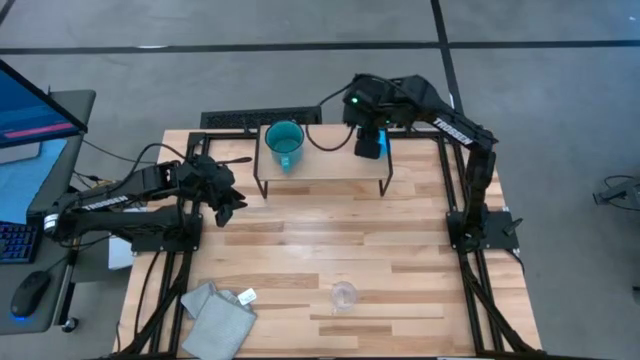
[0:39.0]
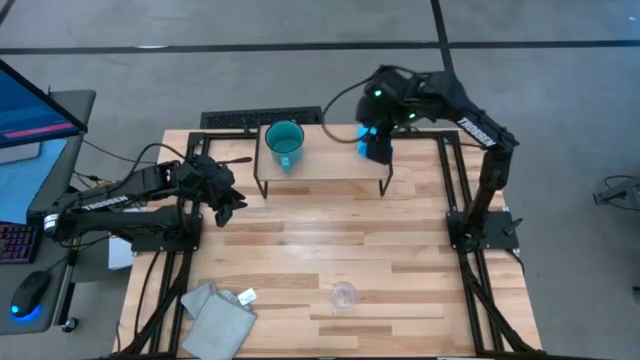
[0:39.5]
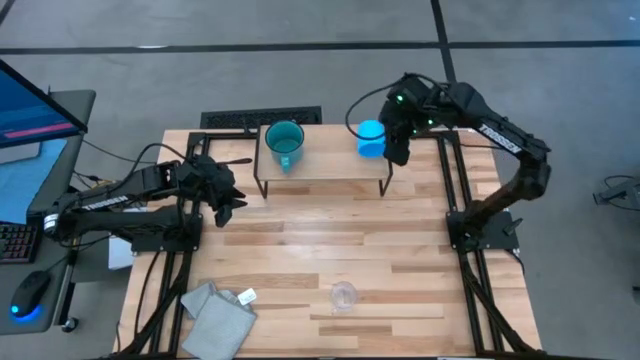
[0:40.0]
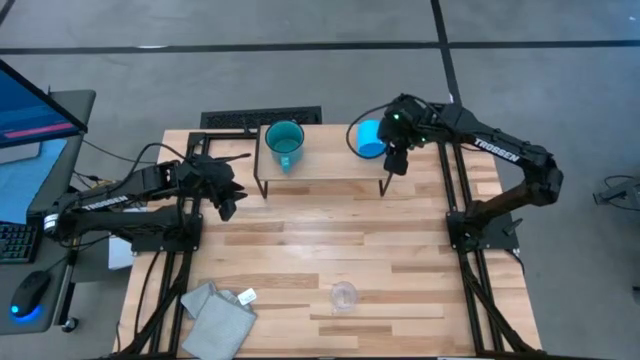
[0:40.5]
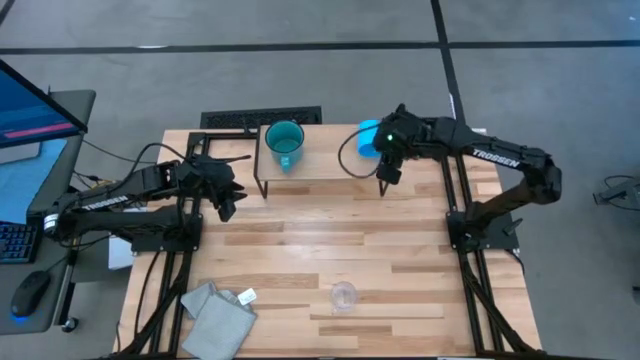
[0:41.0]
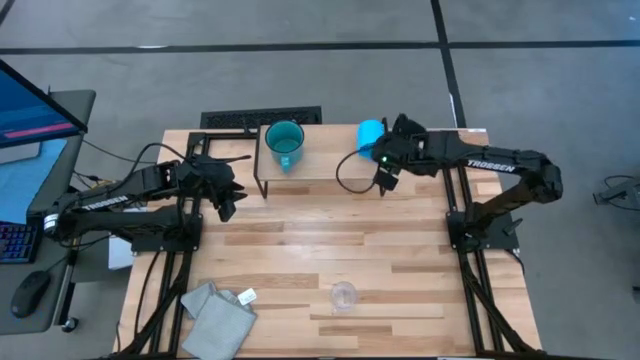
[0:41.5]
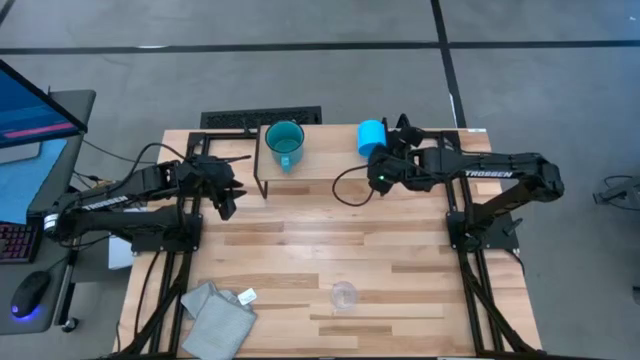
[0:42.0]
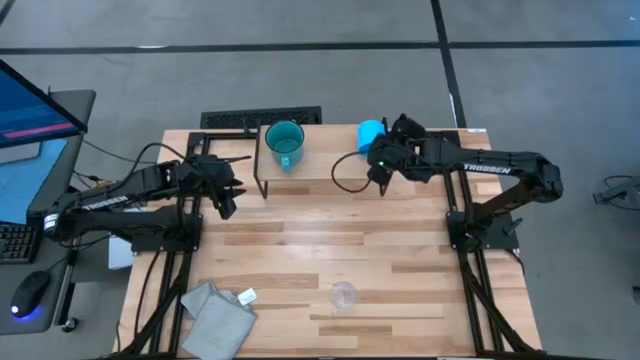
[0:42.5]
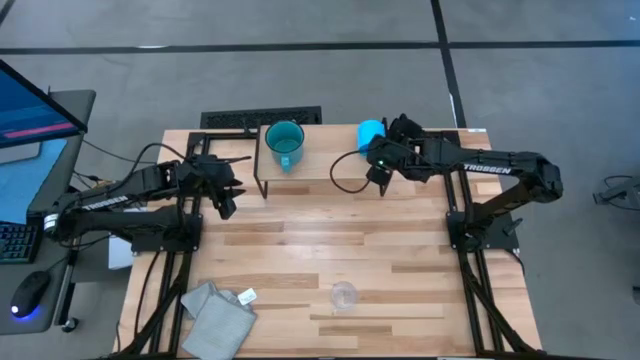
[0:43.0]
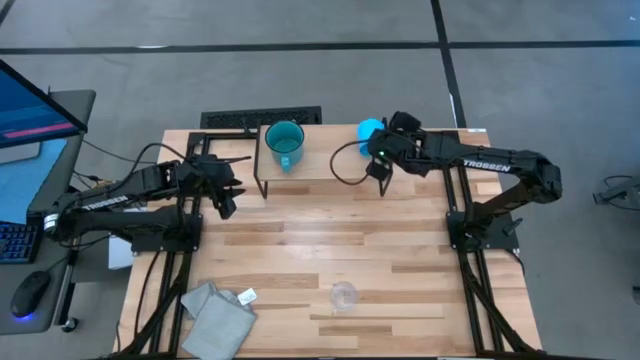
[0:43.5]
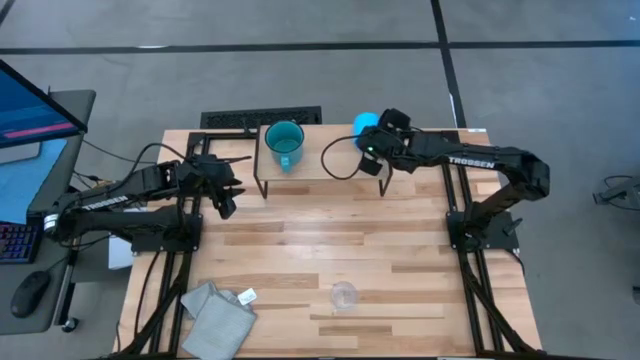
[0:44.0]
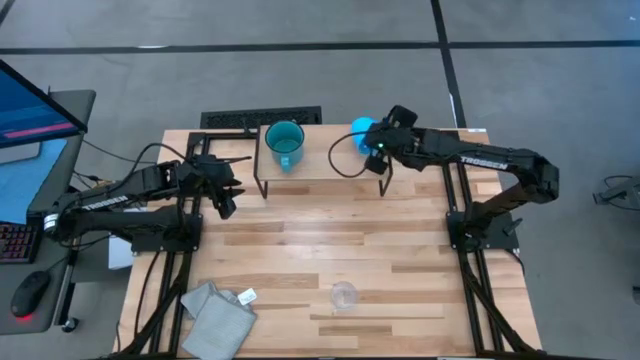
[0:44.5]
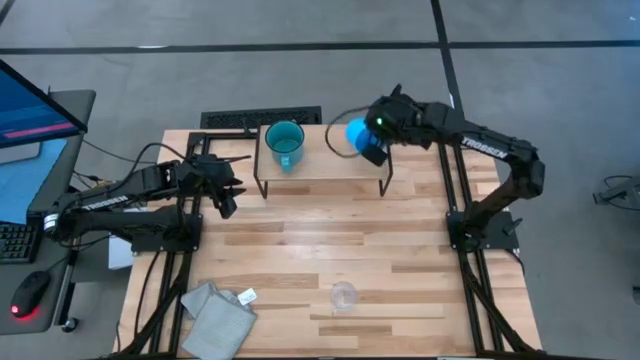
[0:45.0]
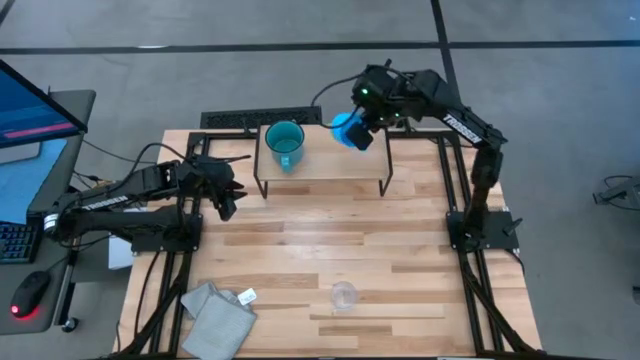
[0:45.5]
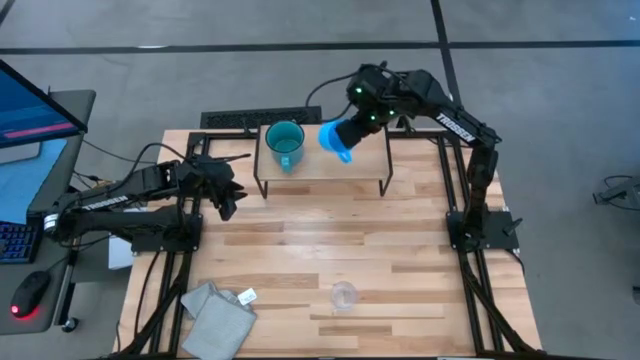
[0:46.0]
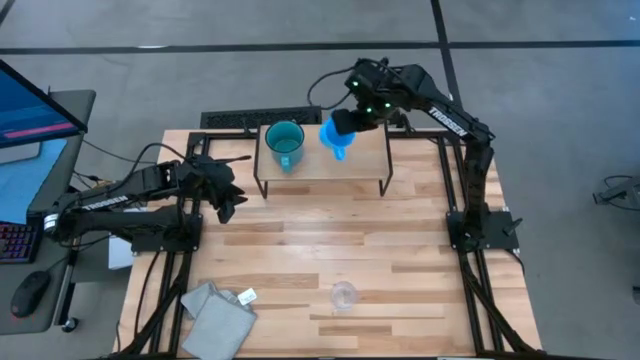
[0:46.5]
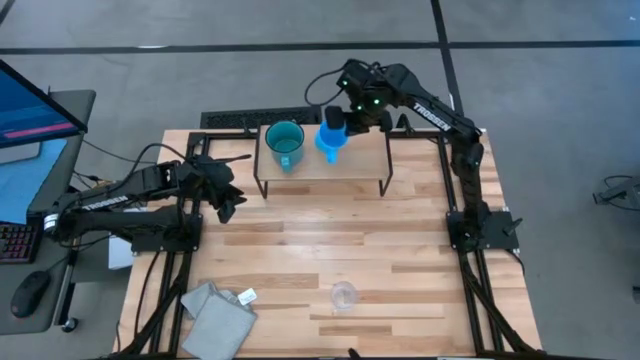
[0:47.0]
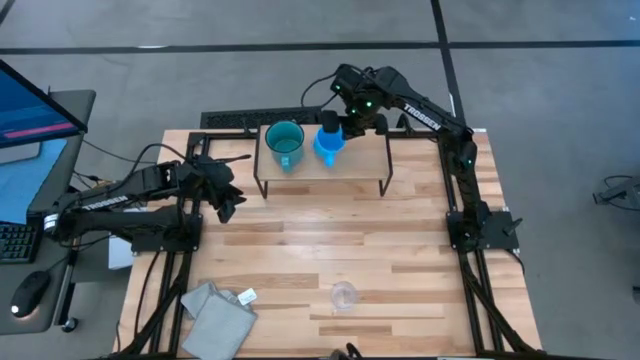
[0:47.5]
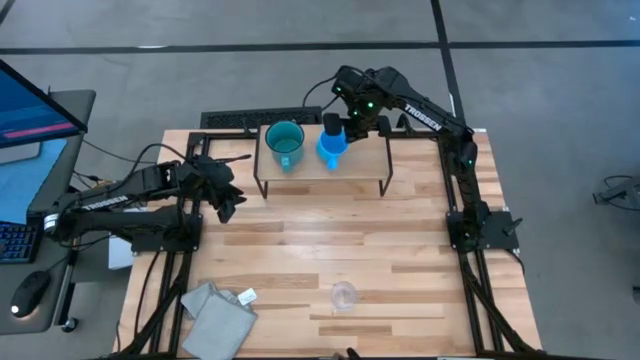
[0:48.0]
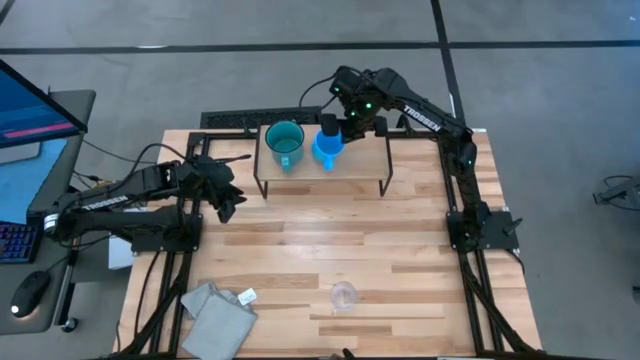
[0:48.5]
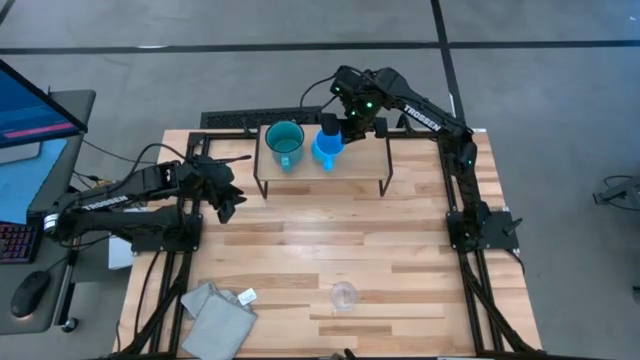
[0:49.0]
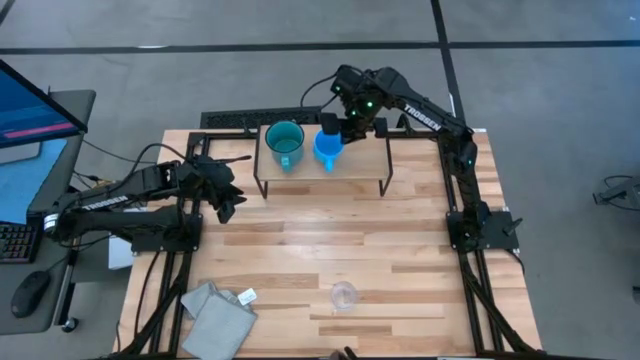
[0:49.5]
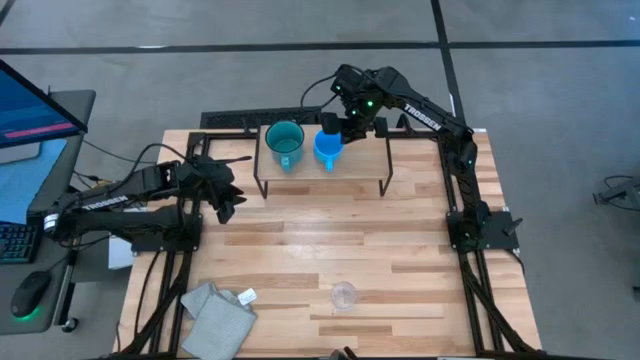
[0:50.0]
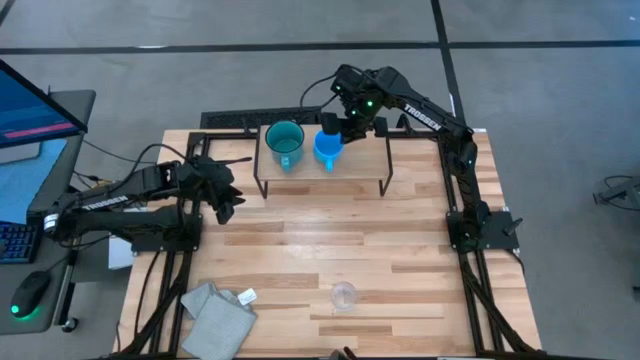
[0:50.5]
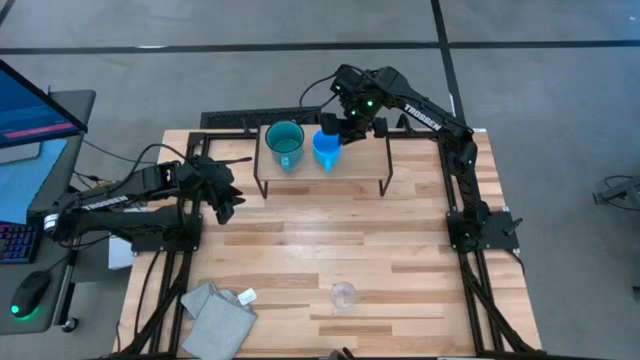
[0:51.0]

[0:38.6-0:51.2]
Task: Stack small to large cups/mugs on shelf
Put the light blue mug on the shelf

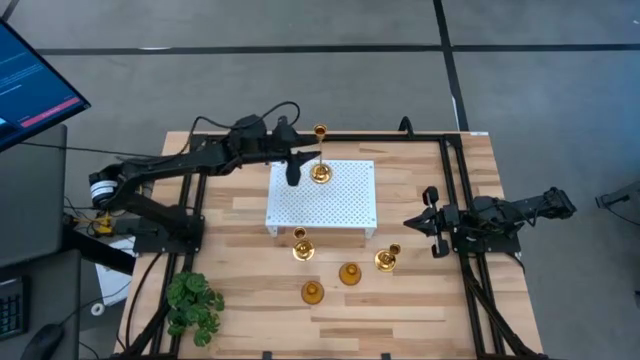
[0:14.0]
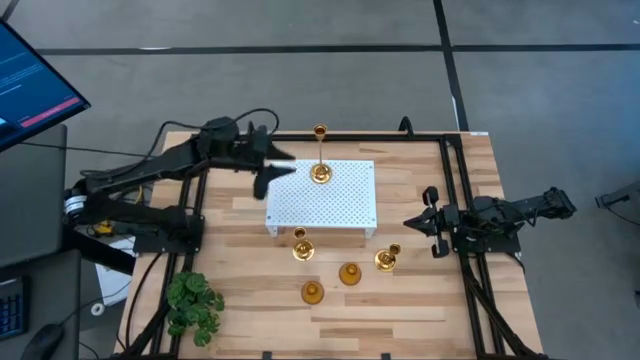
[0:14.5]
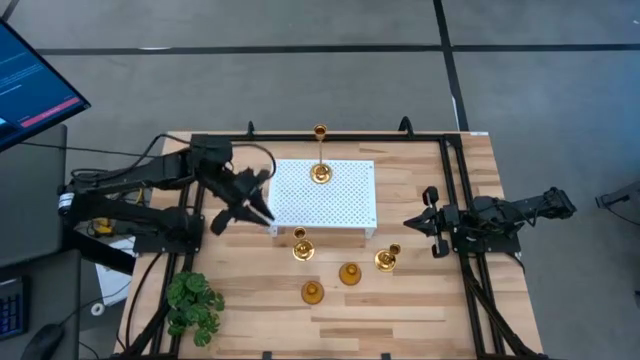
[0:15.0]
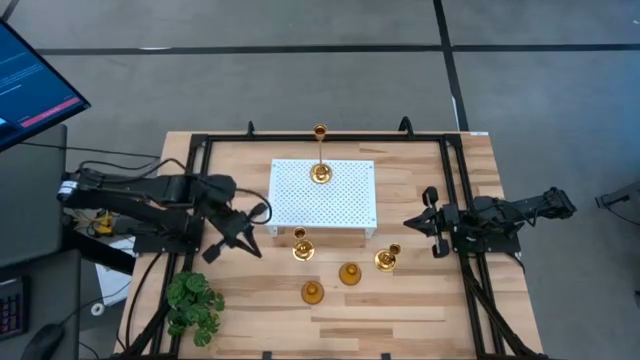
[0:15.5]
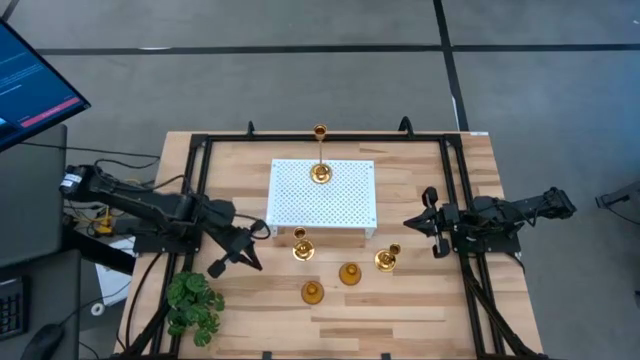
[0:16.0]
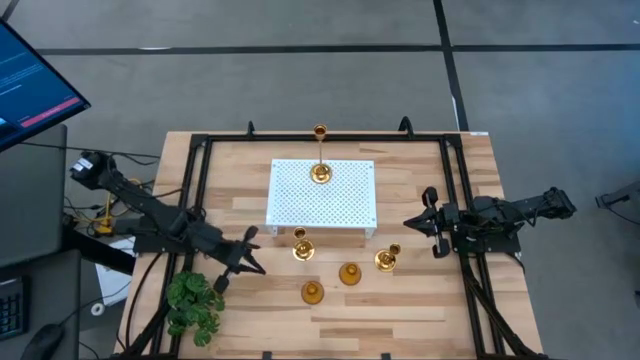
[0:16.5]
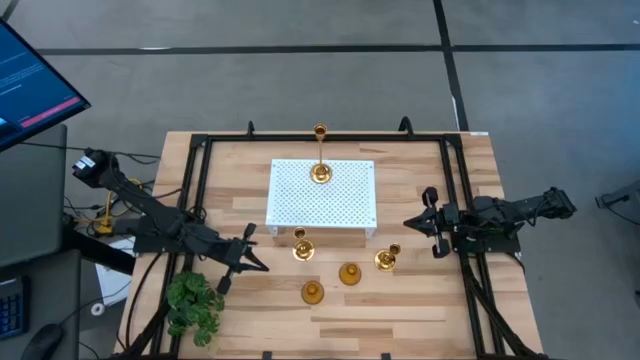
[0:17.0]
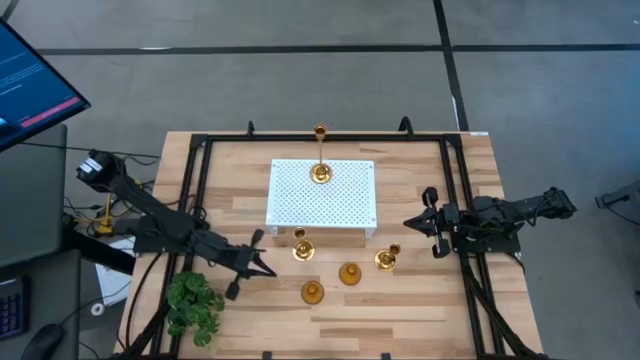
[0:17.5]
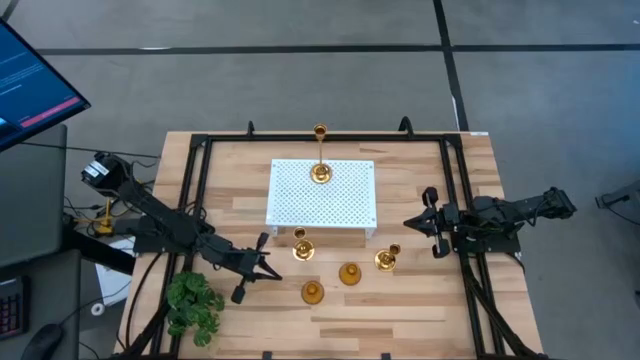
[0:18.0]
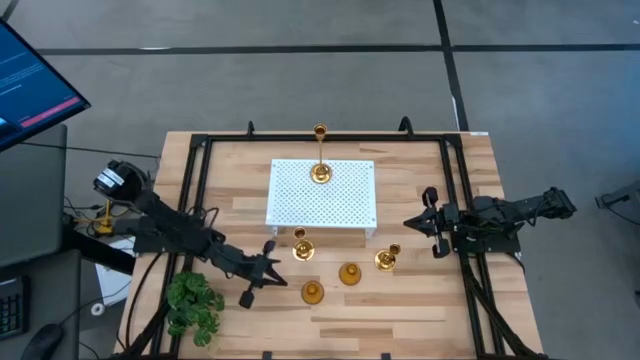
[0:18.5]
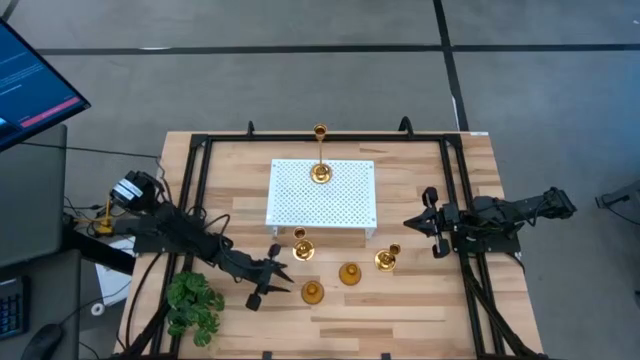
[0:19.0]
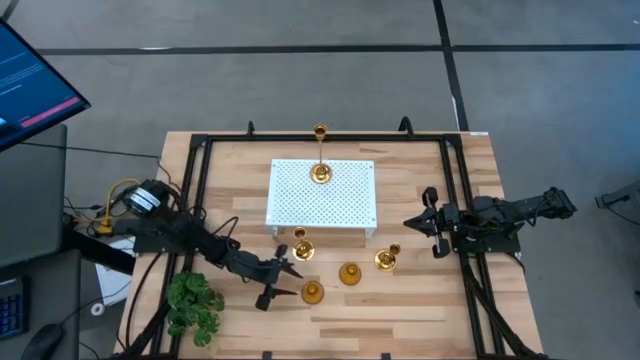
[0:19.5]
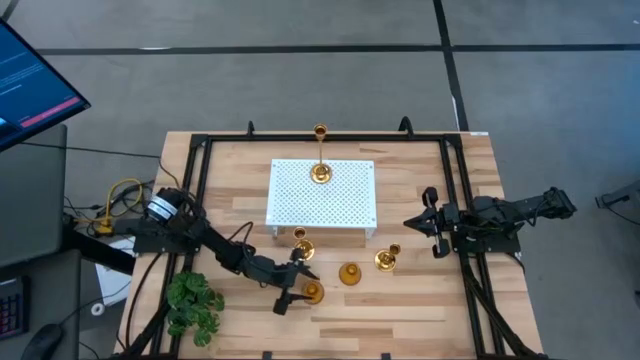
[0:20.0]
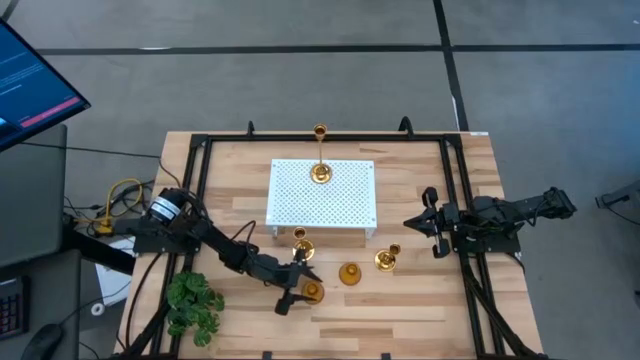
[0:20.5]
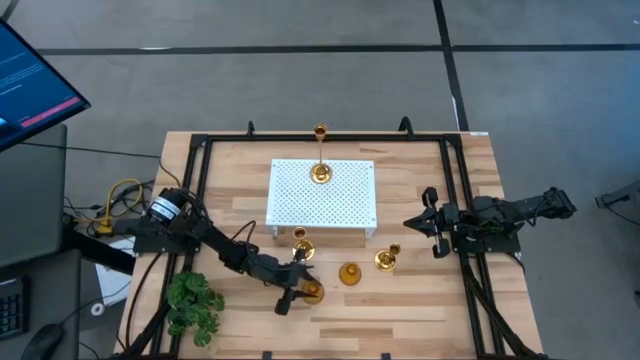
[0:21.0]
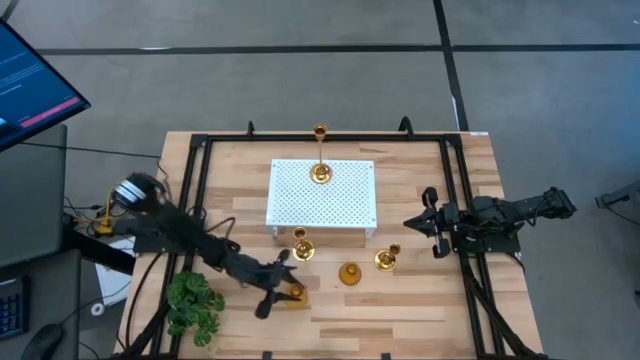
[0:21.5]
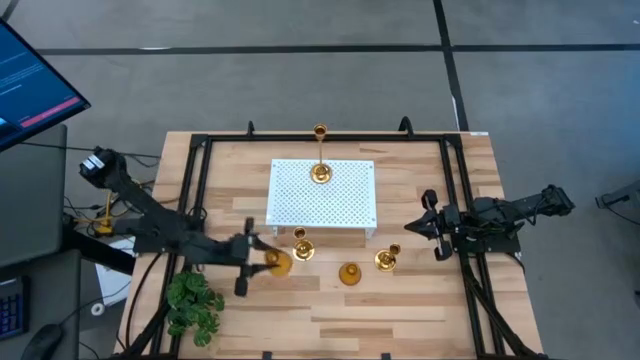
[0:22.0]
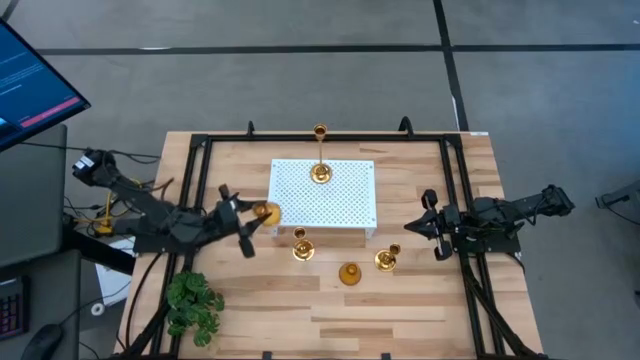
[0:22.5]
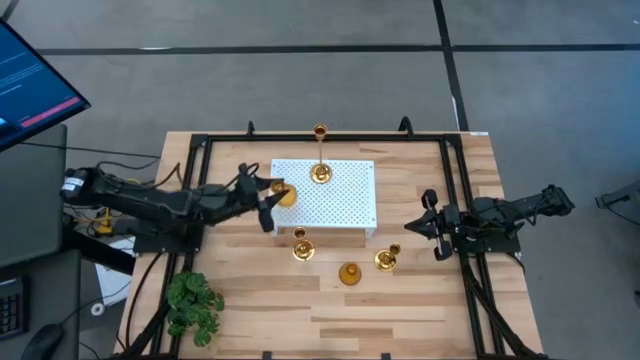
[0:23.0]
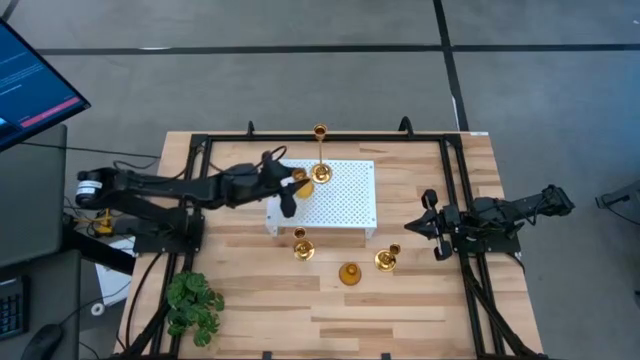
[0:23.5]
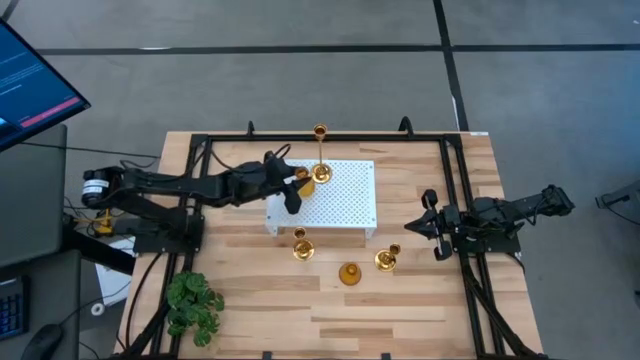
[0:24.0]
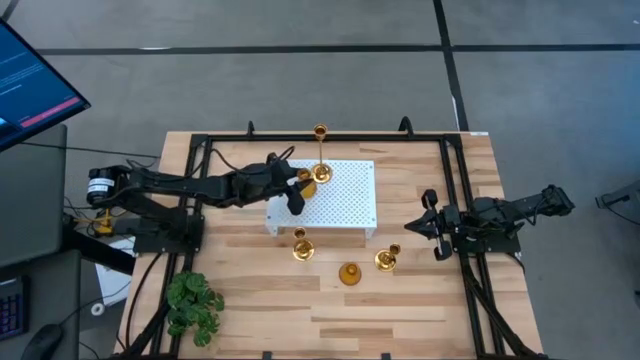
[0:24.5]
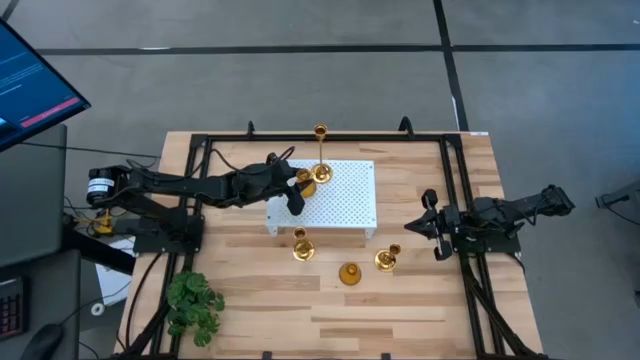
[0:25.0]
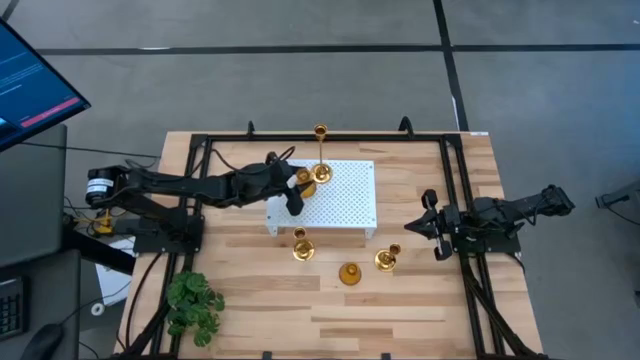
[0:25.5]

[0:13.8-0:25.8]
Task: Pick & Place candle stick holders
Put the left orange candle holder on the shelf
